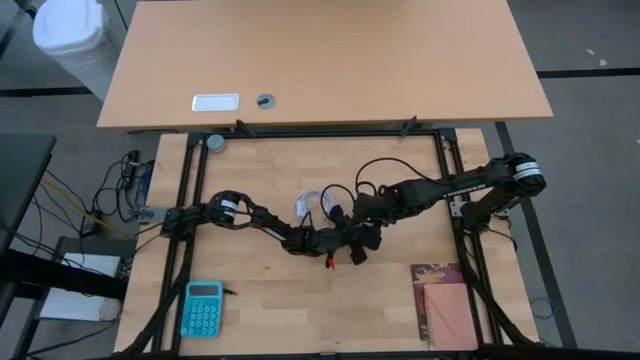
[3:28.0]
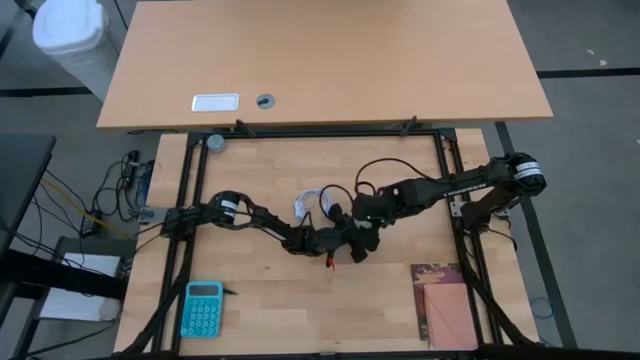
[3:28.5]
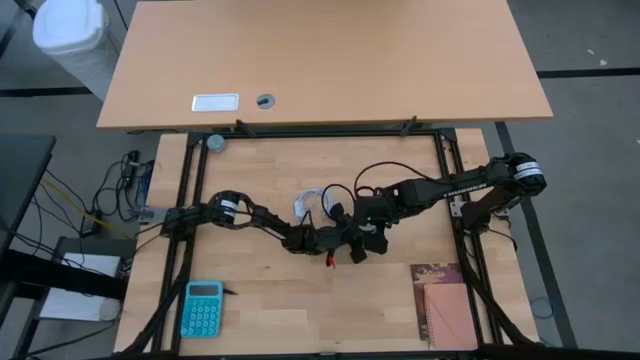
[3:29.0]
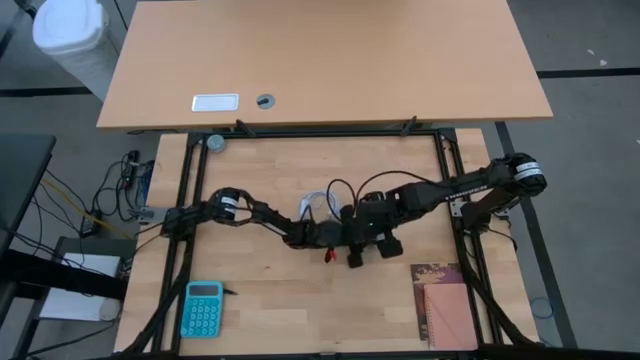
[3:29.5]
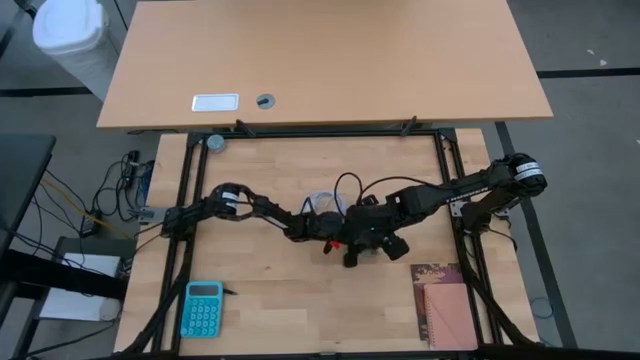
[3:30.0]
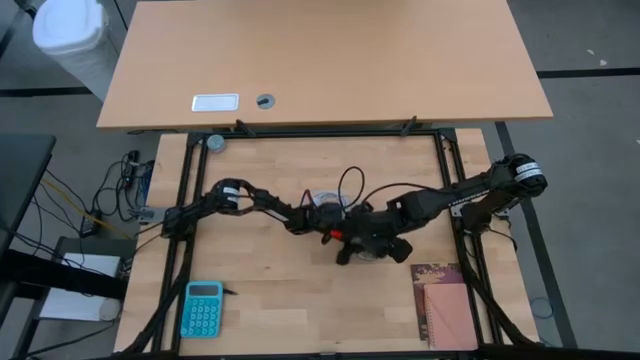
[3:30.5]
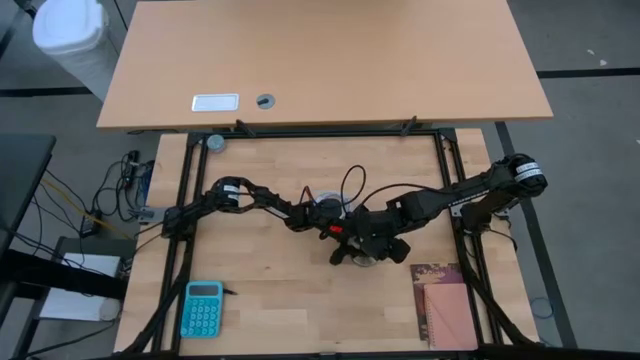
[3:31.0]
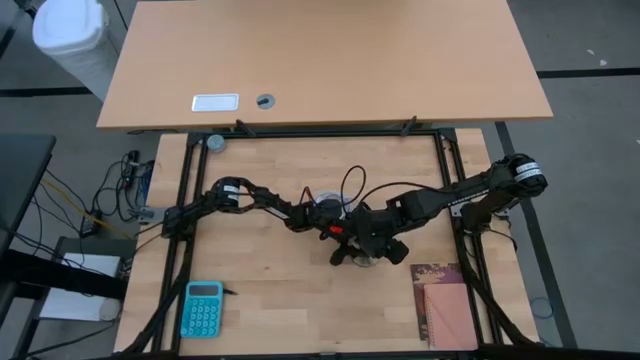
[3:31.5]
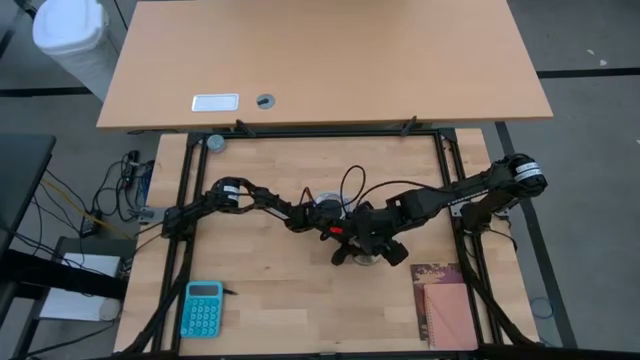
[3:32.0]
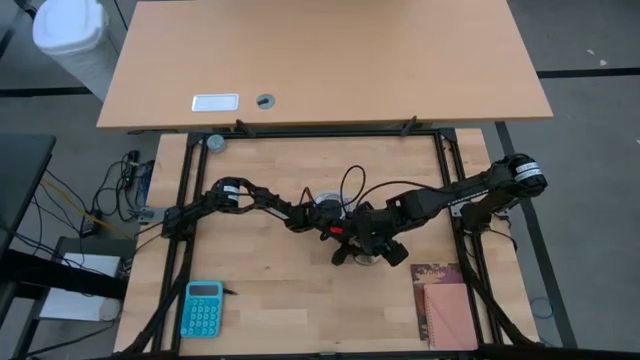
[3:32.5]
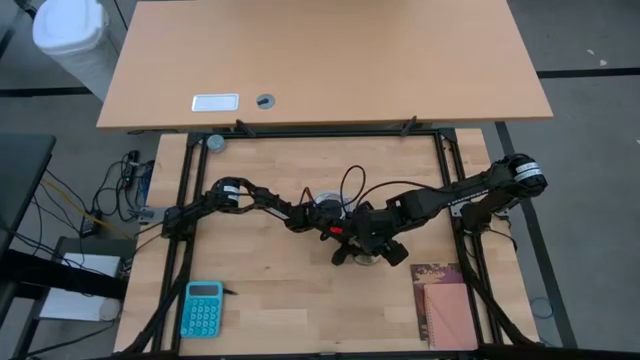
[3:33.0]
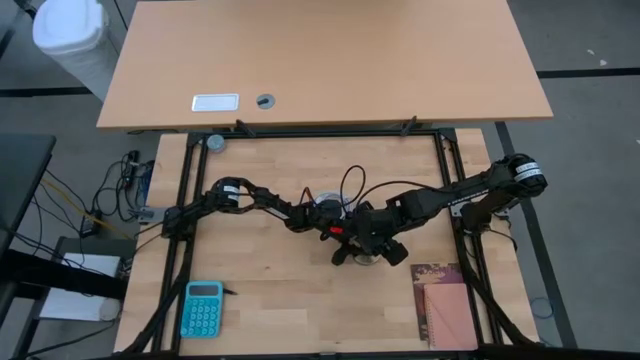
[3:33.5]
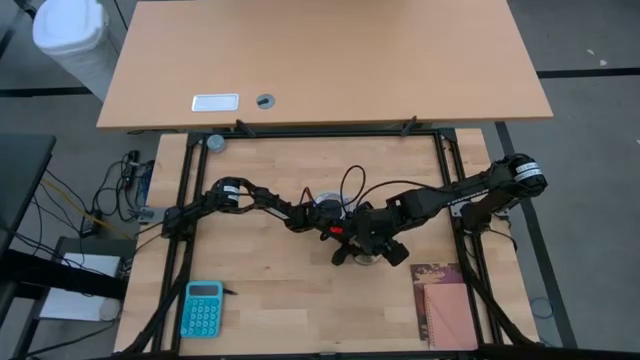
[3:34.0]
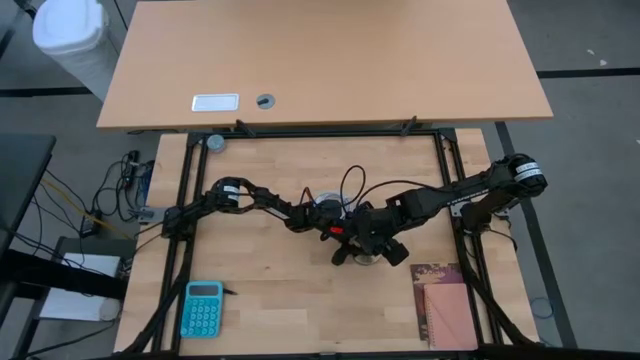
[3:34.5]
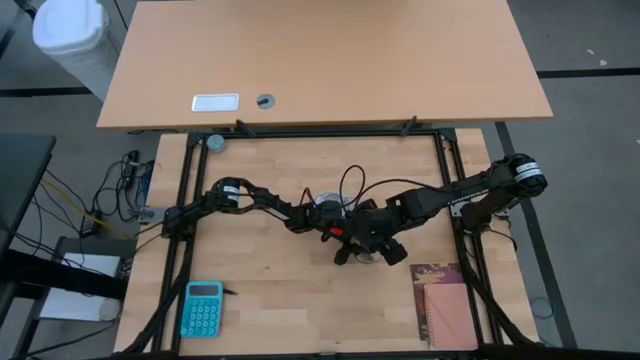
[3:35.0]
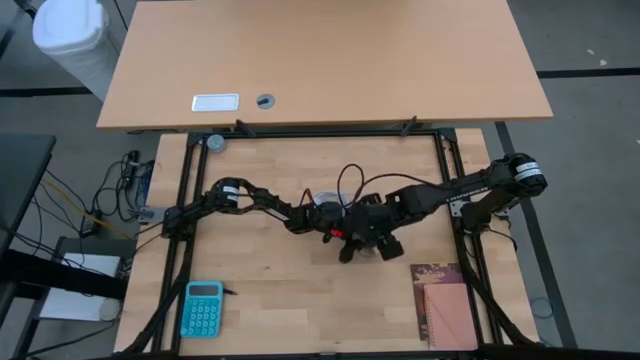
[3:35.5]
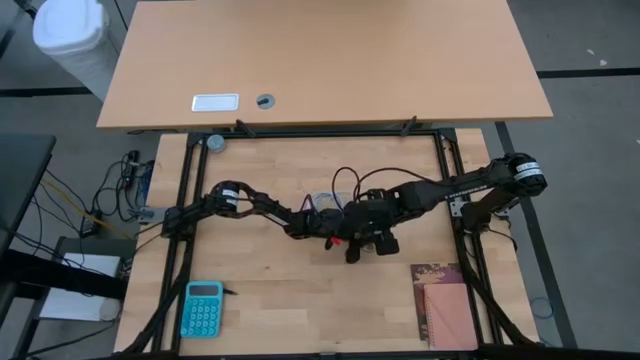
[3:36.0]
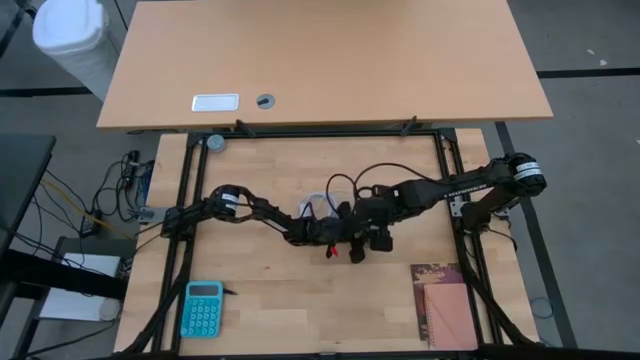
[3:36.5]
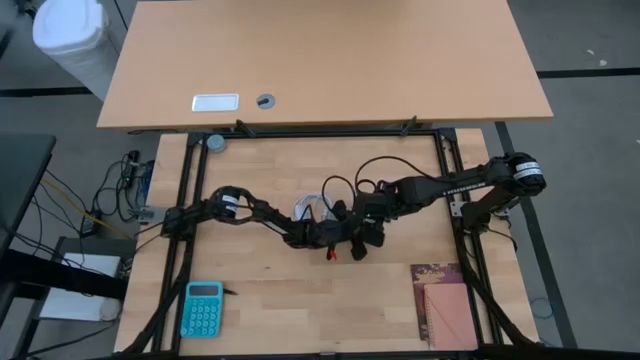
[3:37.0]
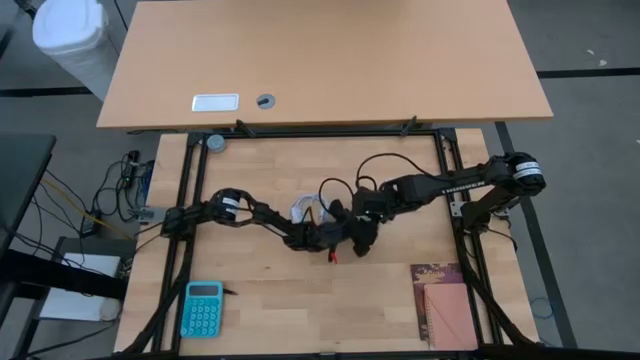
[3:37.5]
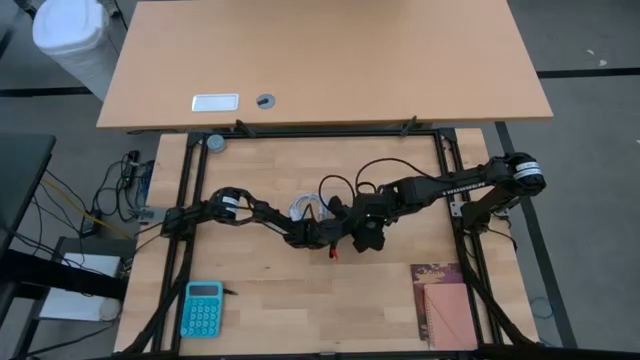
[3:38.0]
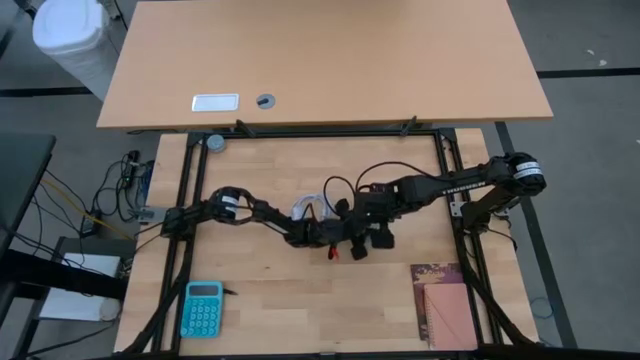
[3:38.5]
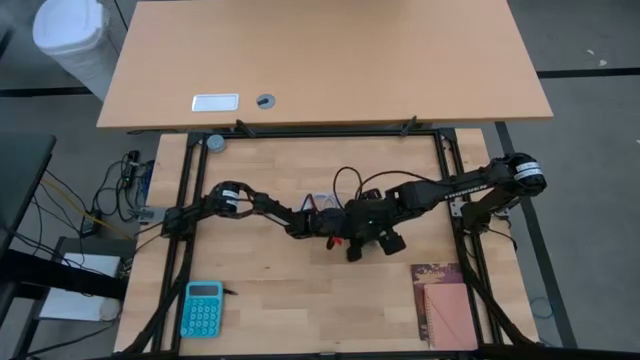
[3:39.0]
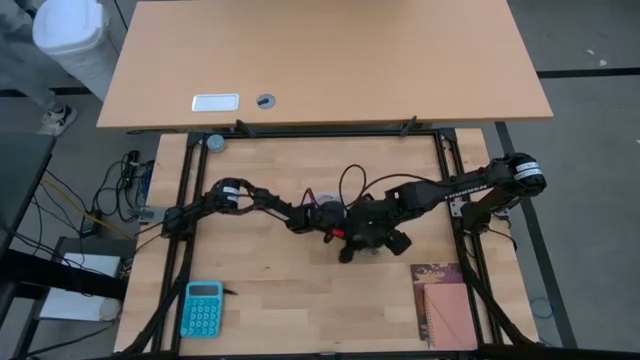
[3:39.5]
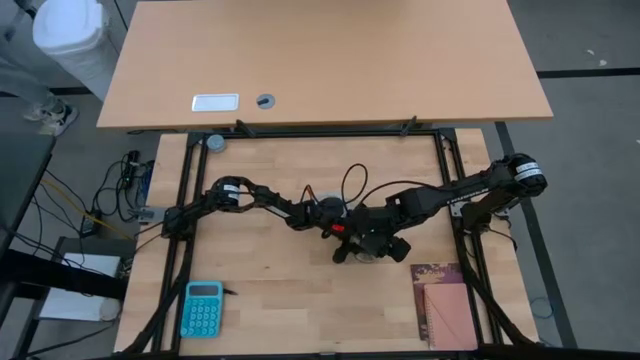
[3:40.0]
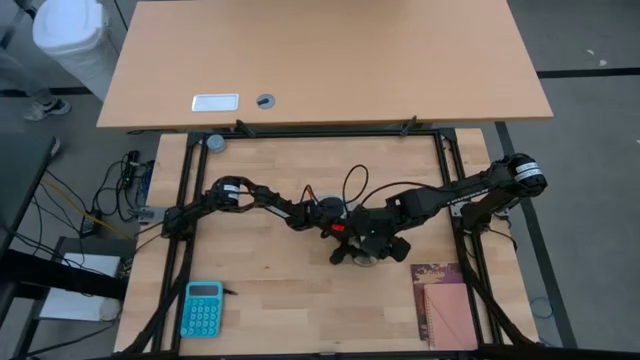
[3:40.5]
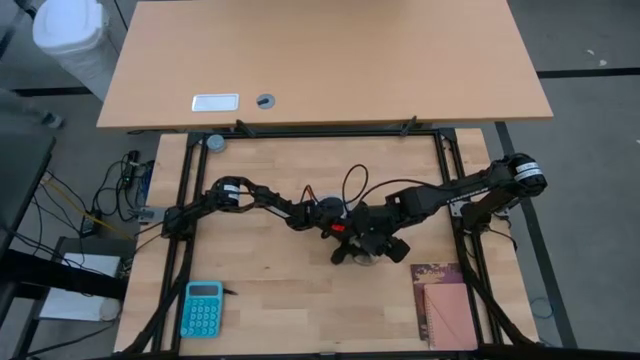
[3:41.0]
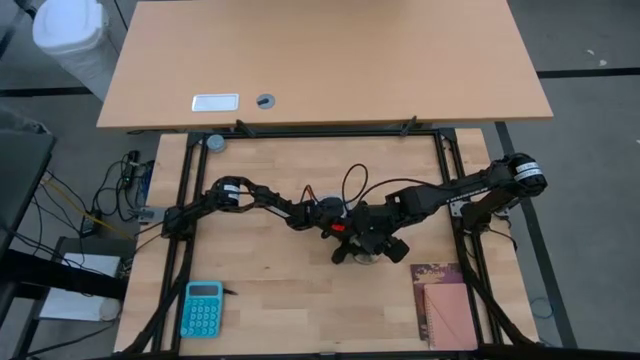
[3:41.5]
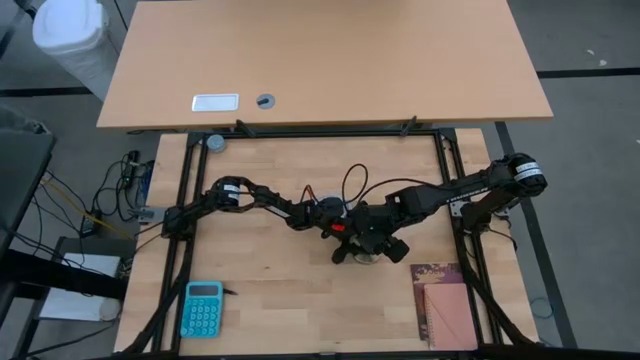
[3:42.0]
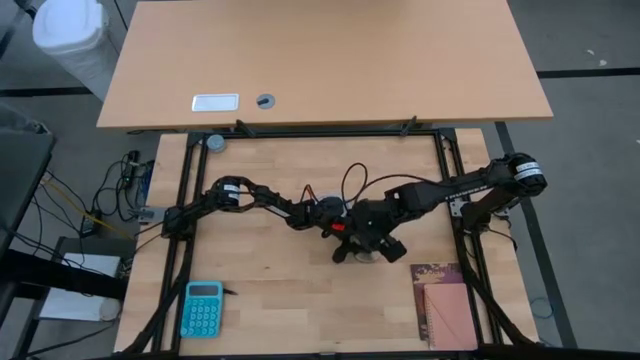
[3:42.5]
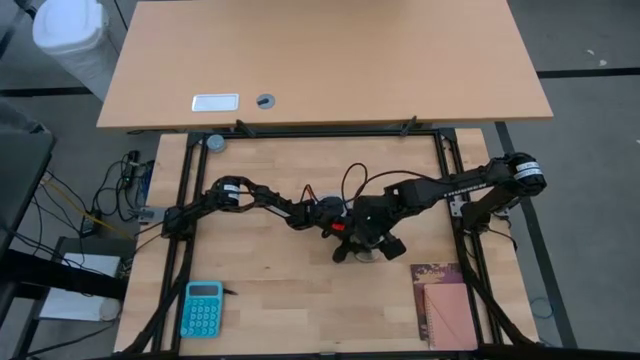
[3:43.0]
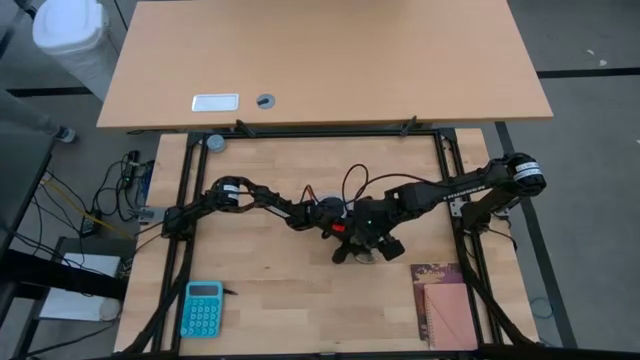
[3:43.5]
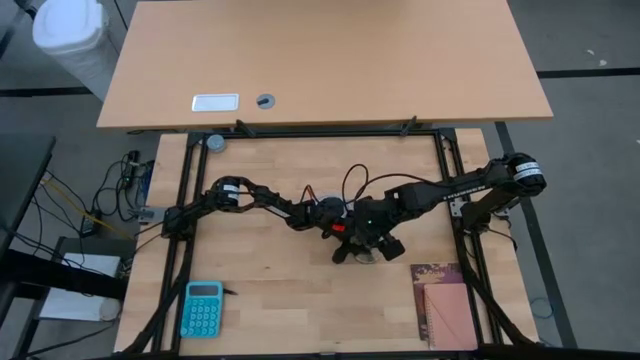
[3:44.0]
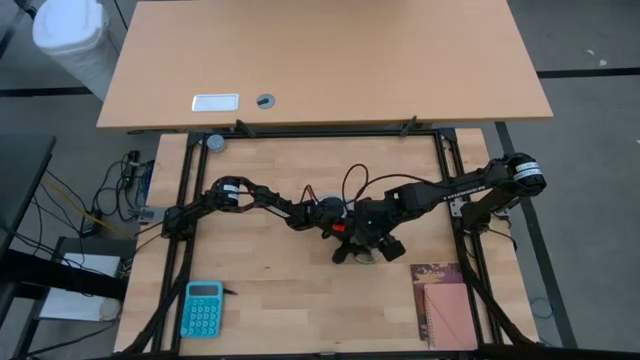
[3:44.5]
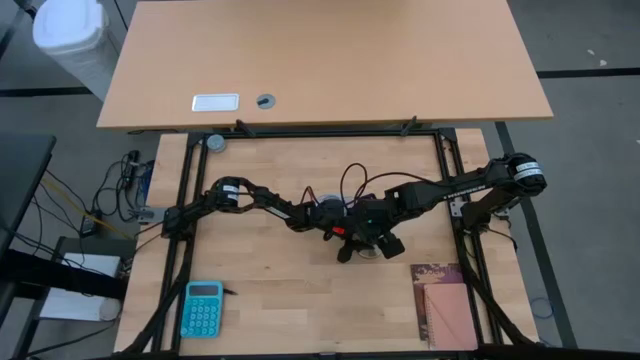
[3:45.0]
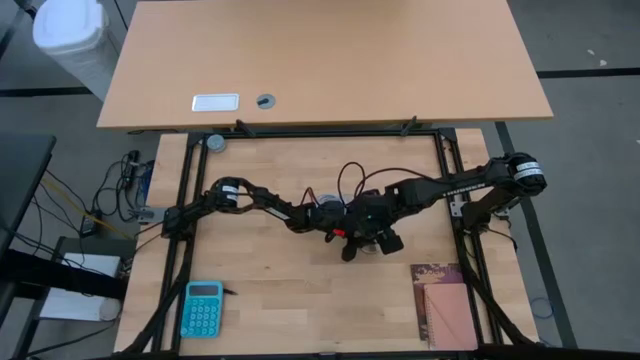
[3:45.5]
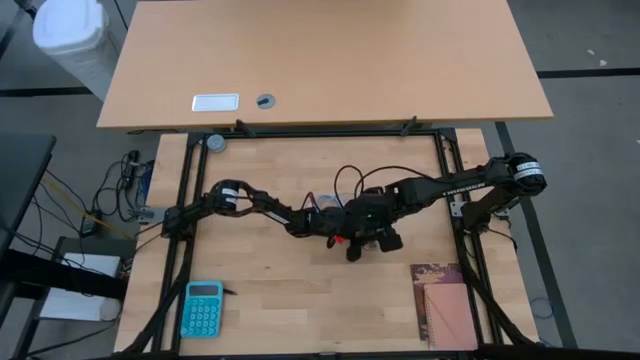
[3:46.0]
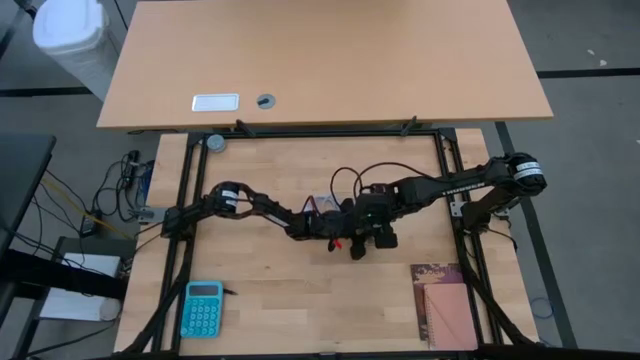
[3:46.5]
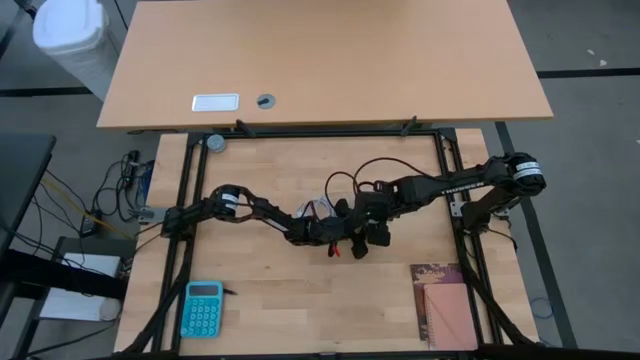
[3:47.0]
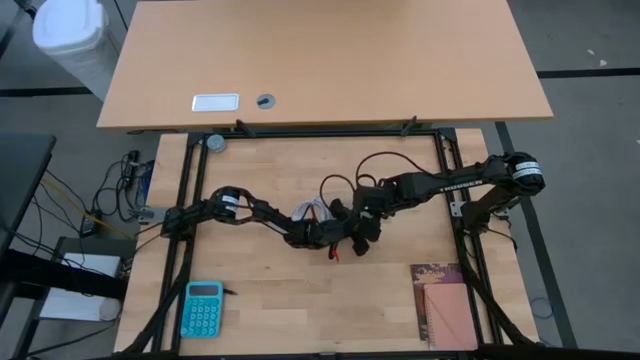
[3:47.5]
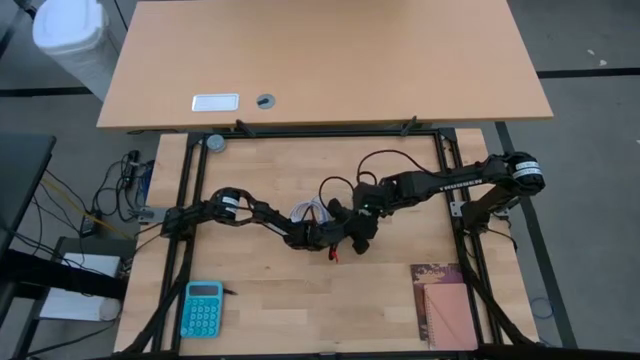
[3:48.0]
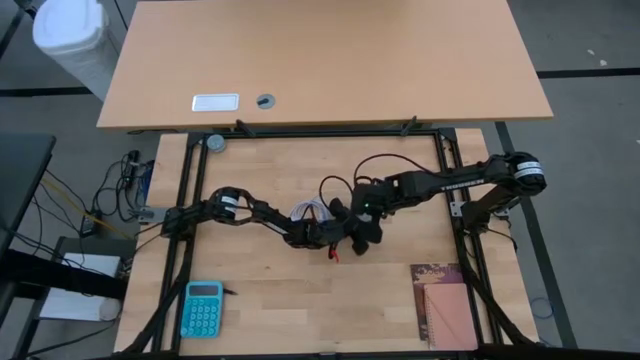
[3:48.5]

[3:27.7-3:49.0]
Task: Screw lightbulb
Insert the white lightbulb into the lamp socket
